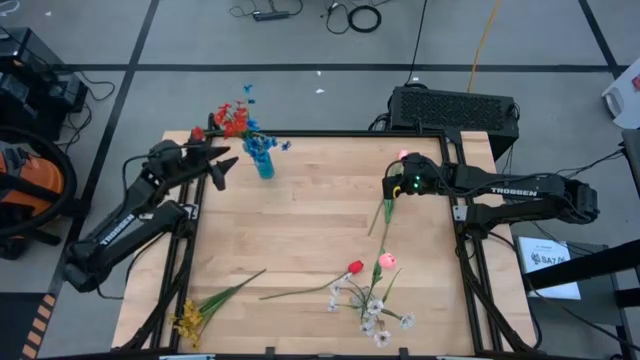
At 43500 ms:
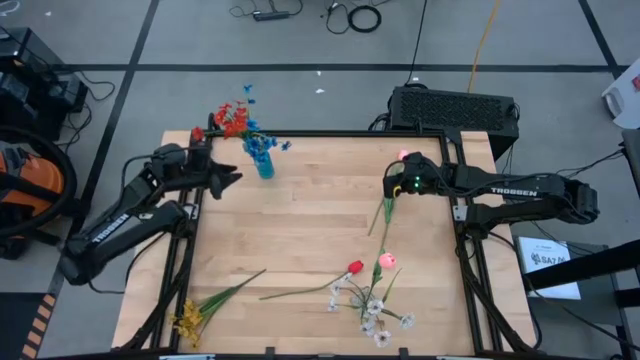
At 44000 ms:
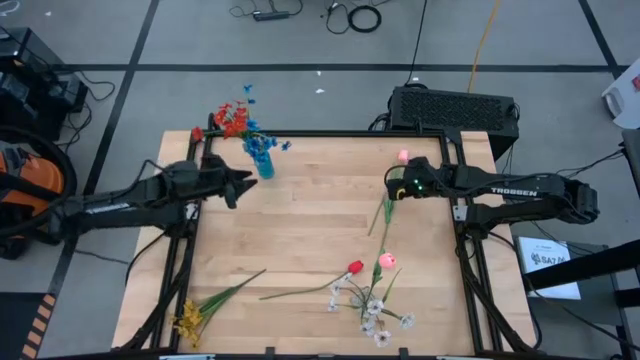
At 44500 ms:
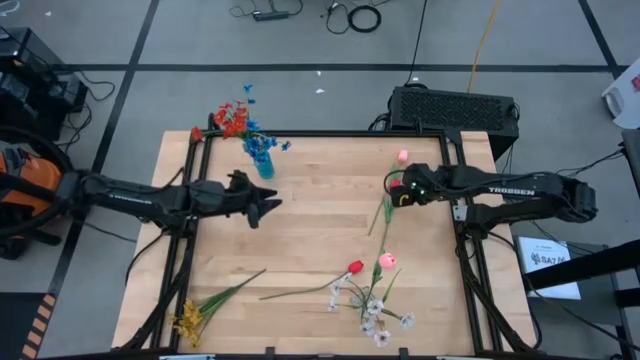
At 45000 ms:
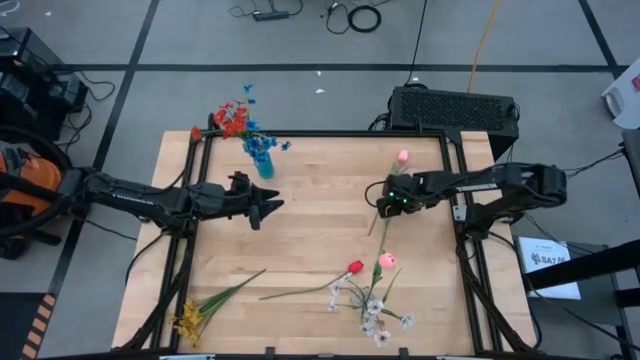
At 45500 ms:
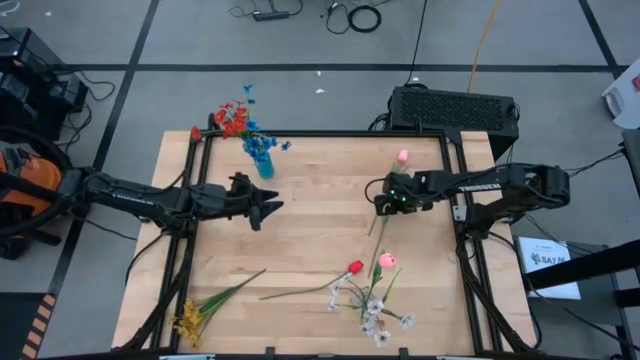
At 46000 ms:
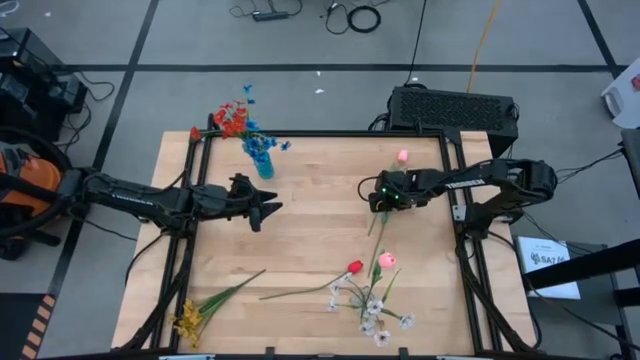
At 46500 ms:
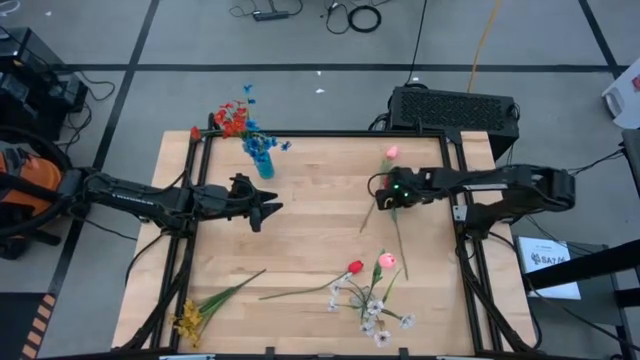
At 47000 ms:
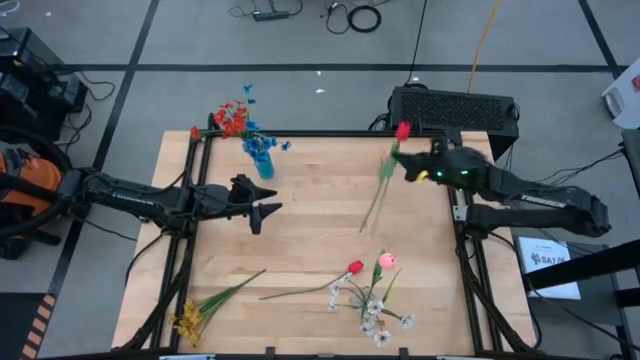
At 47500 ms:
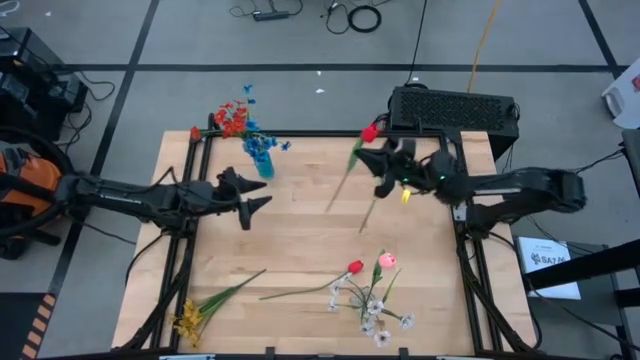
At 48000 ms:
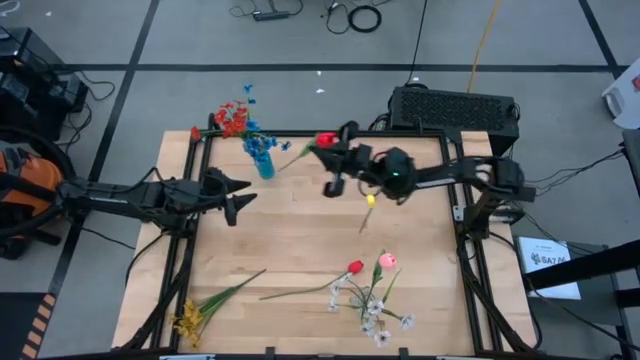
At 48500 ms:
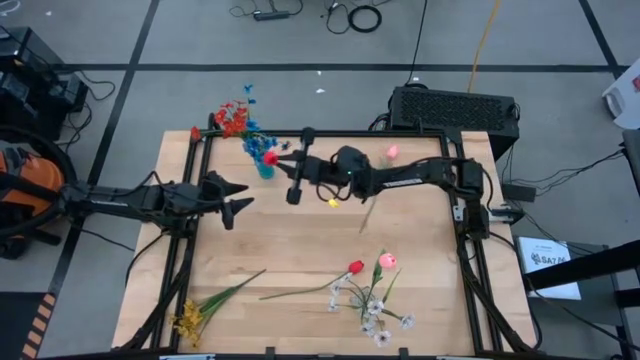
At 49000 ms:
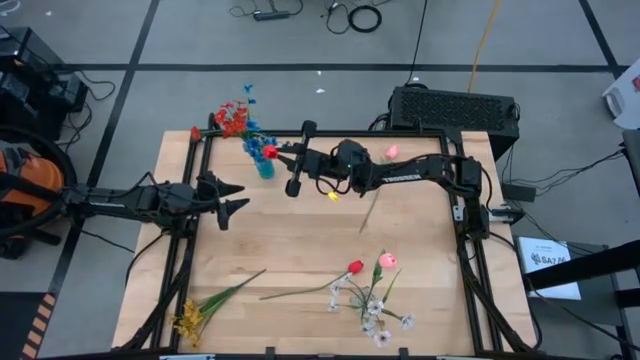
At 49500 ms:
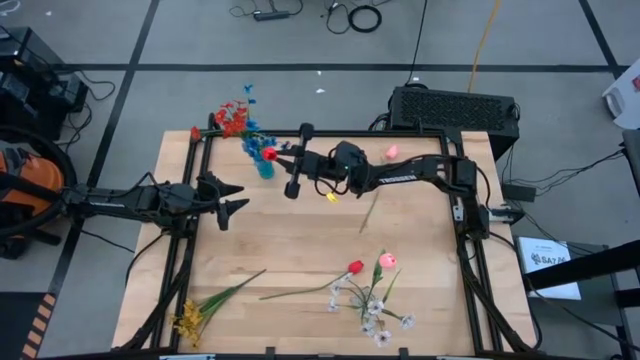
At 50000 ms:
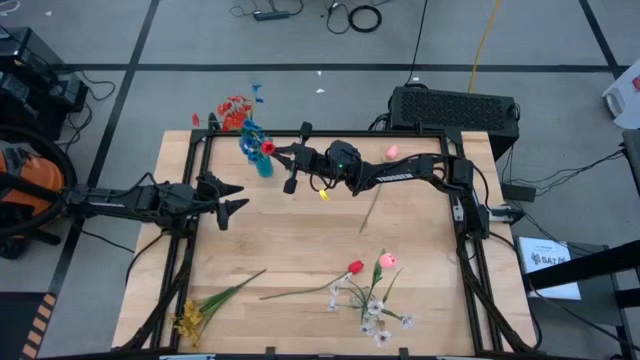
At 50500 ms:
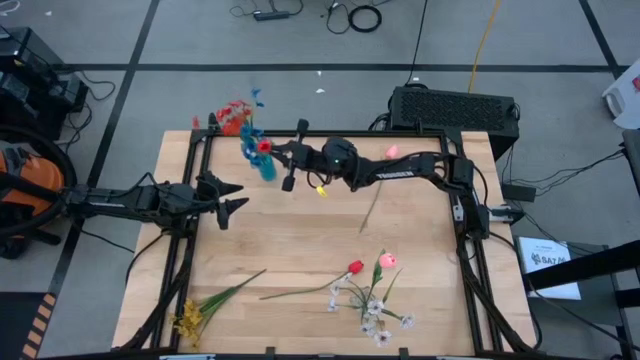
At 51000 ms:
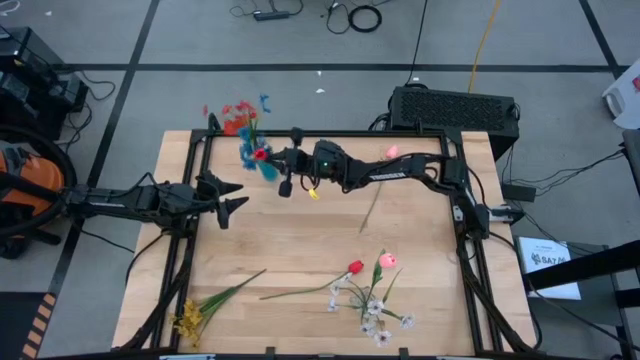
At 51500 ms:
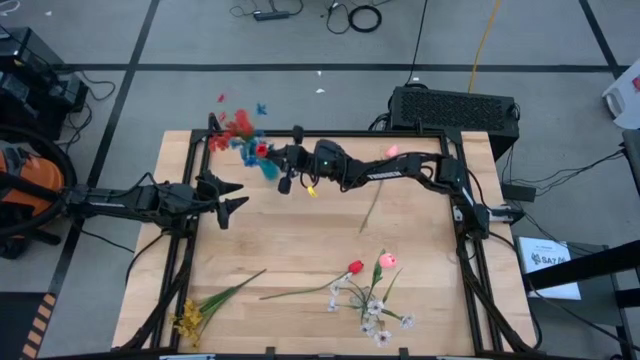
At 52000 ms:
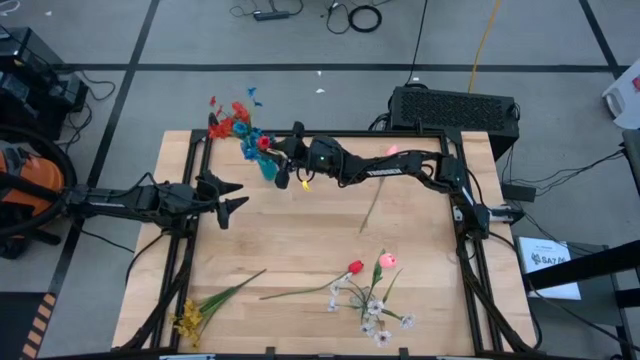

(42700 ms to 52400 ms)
Task: Sort flowers into vase by color
Put the top red flower into the blue vase

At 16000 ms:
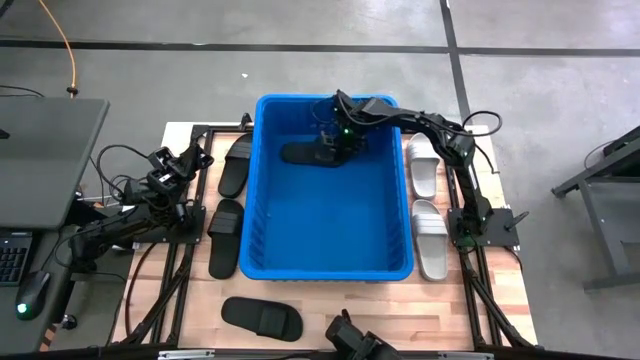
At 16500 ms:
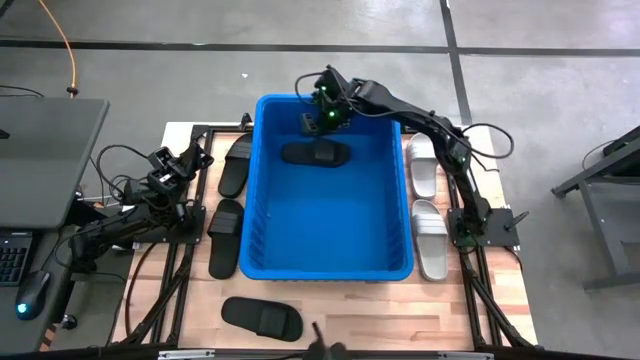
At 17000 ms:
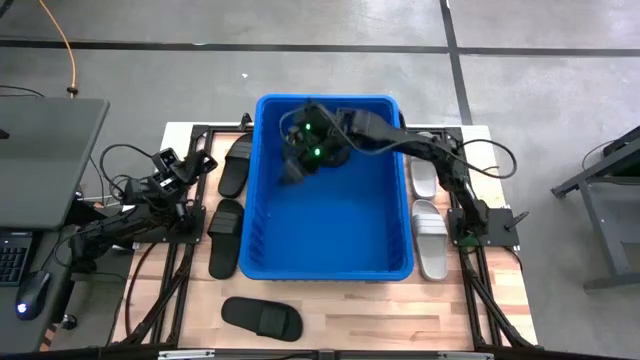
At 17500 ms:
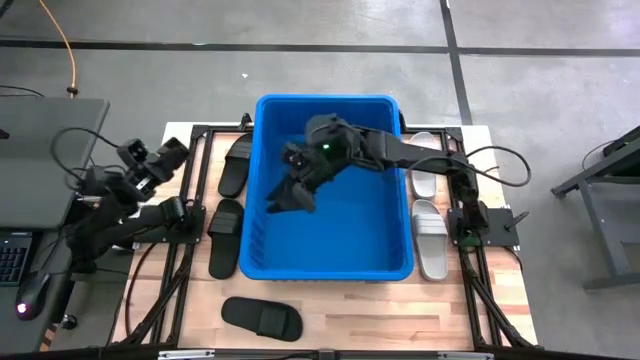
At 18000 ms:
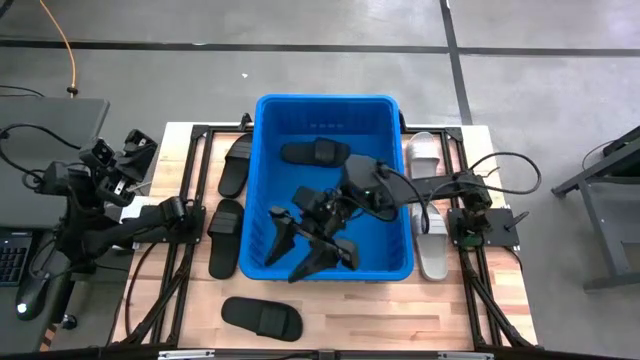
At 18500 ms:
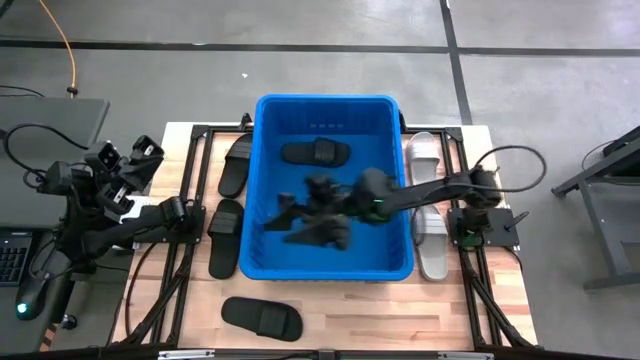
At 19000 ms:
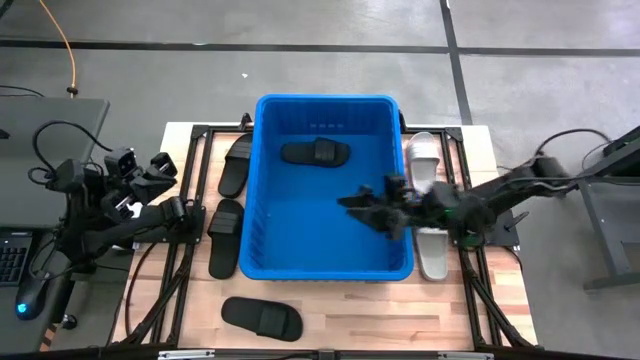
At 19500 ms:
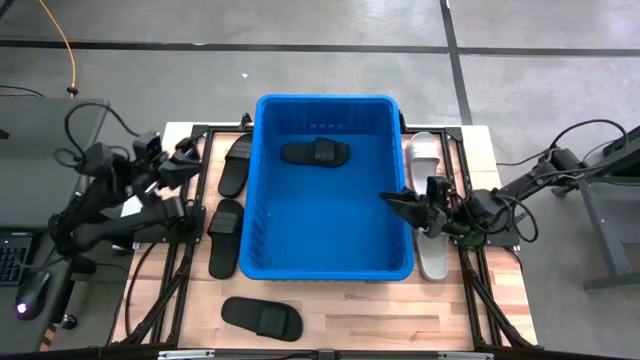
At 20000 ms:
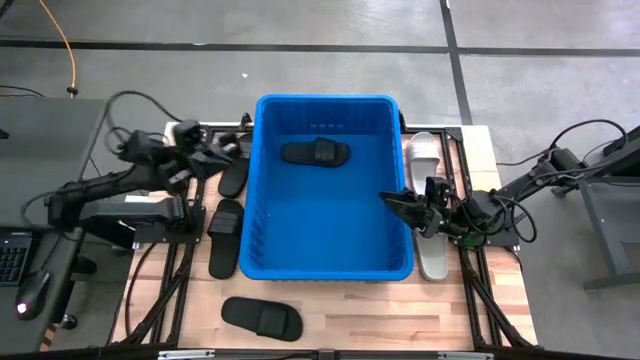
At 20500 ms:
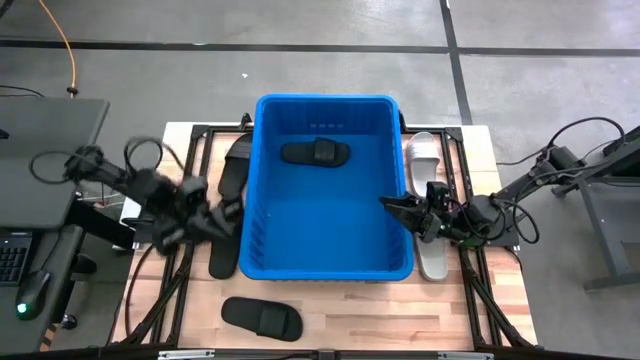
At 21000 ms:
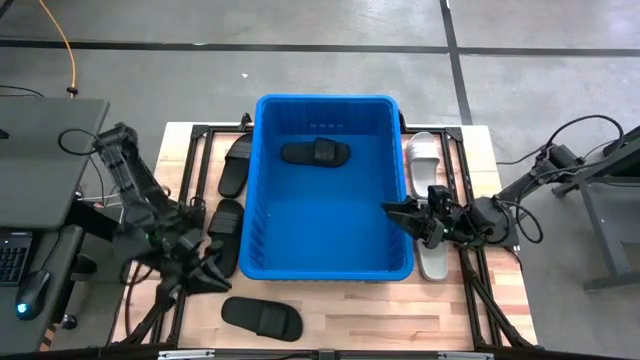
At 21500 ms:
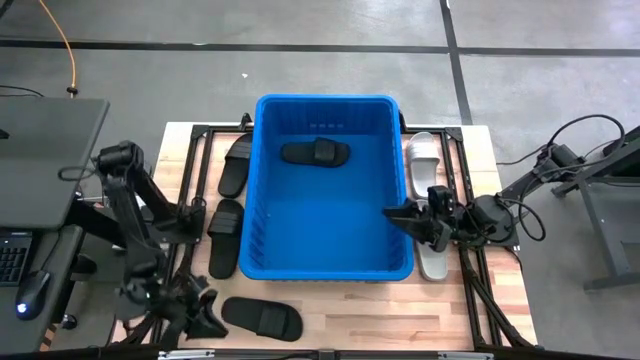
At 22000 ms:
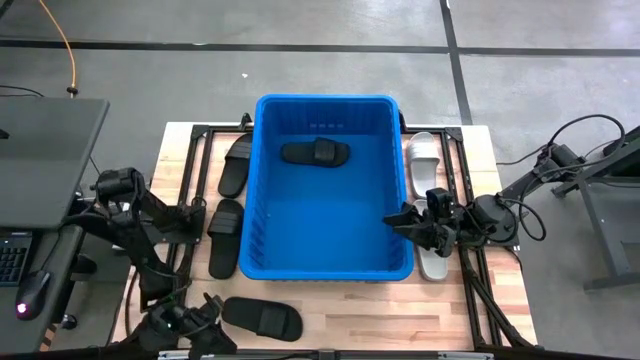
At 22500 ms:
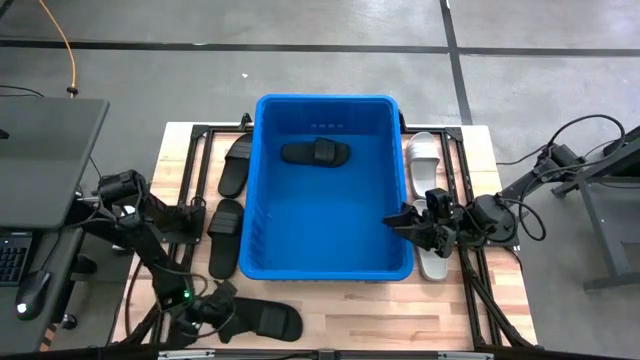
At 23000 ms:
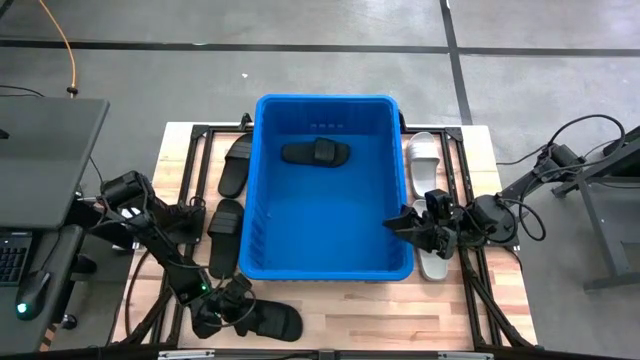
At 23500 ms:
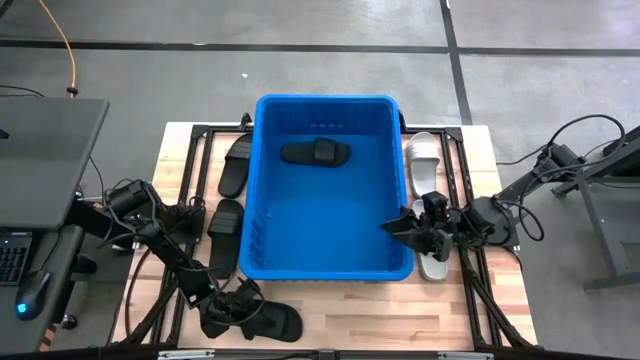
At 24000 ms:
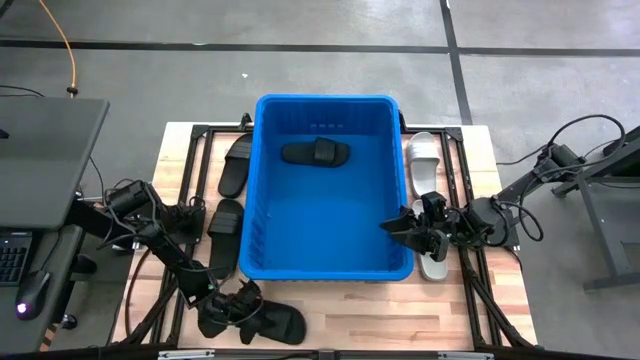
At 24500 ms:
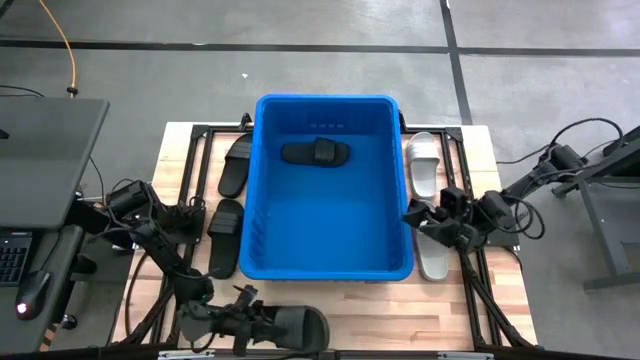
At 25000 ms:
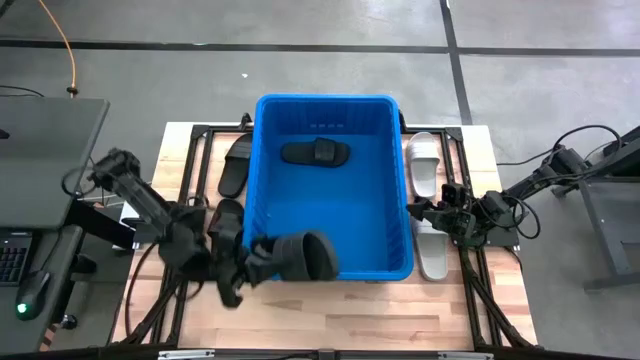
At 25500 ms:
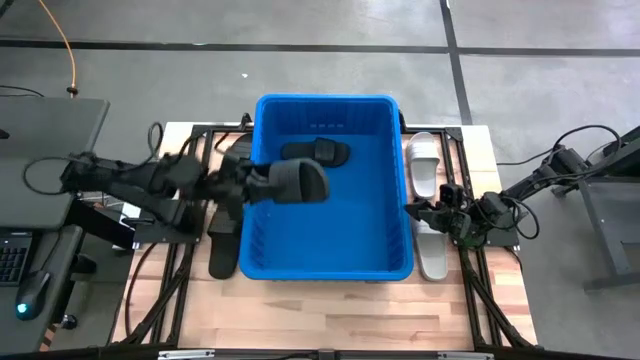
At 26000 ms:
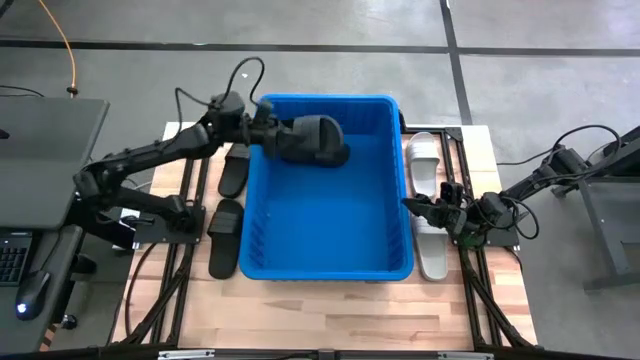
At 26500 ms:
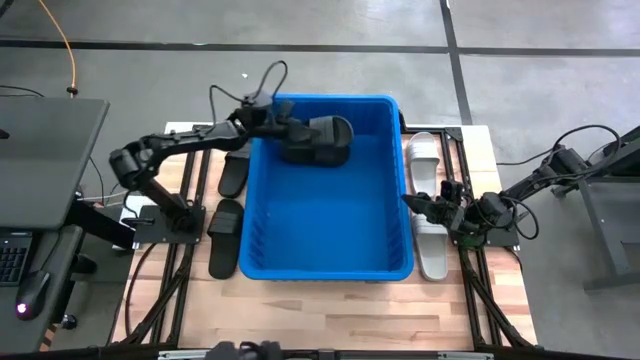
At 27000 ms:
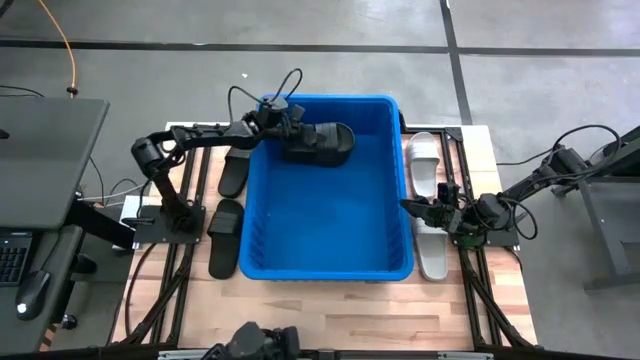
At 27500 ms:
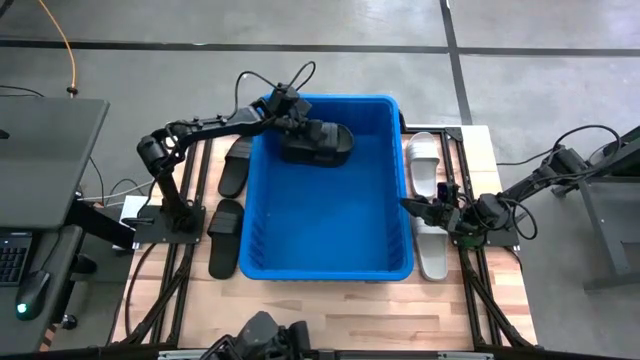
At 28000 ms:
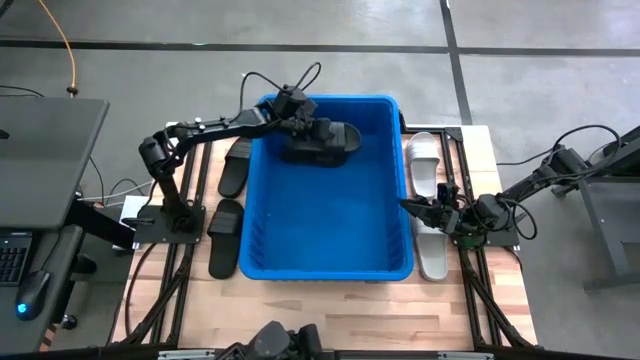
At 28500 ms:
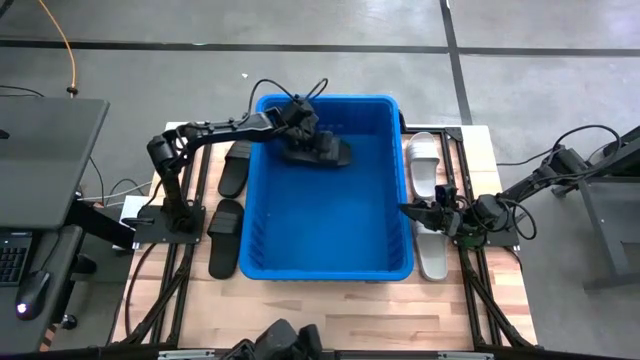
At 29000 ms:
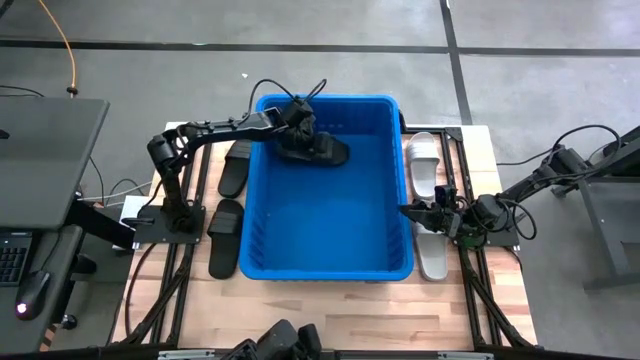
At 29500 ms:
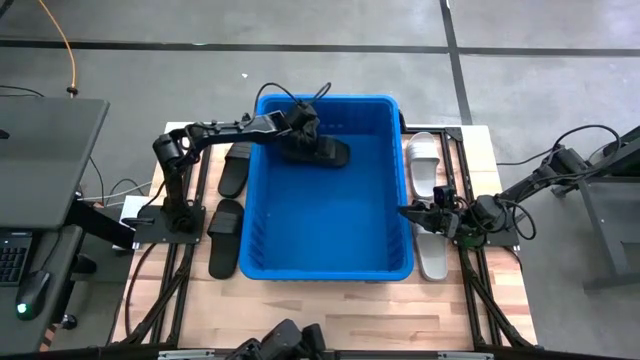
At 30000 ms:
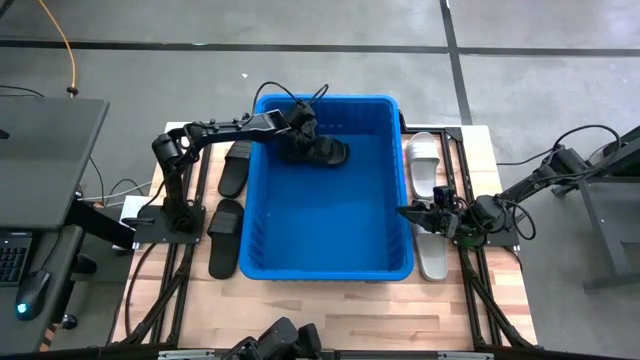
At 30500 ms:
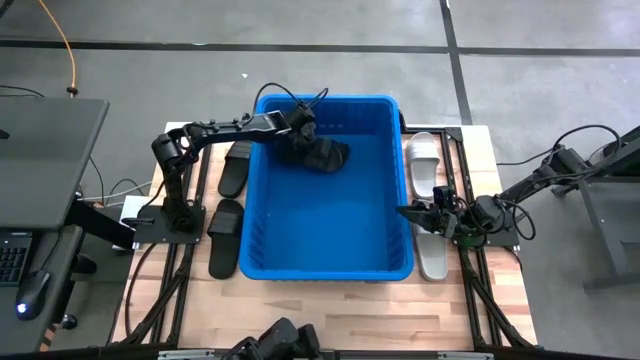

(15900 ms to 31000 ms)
Task: Pick and place slides into bin
Put the black slide into the blue container
